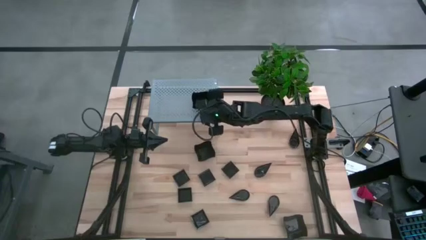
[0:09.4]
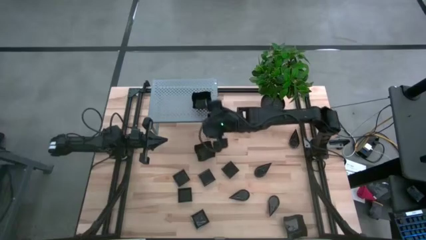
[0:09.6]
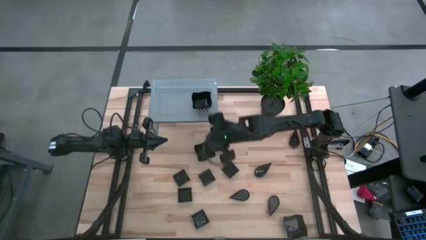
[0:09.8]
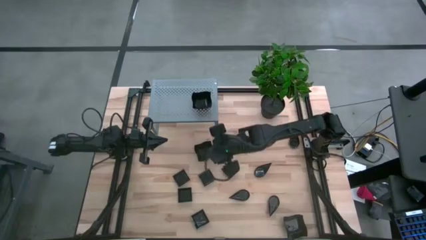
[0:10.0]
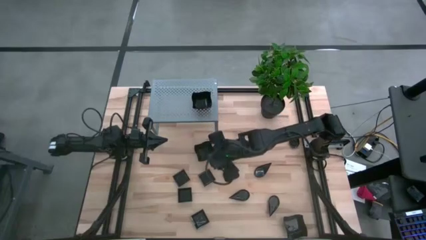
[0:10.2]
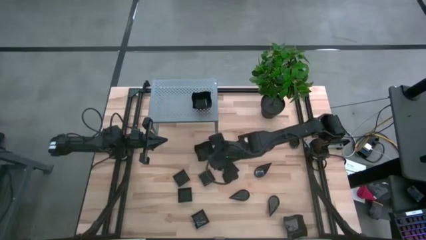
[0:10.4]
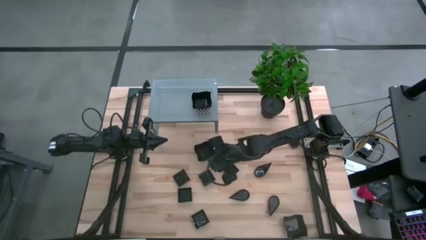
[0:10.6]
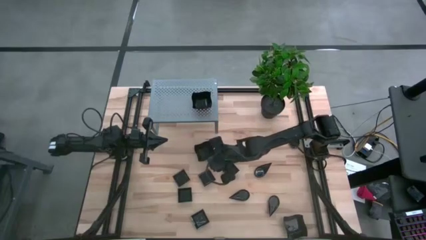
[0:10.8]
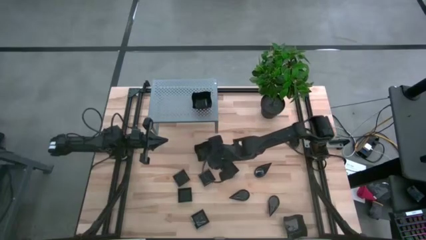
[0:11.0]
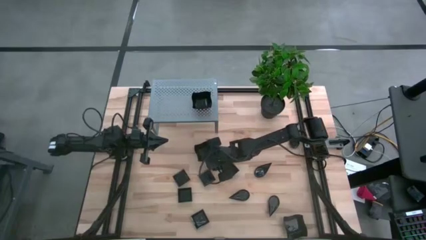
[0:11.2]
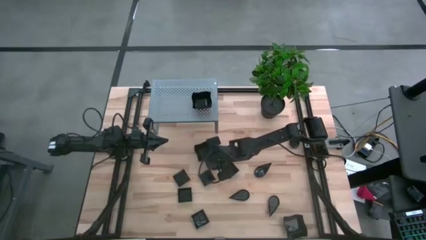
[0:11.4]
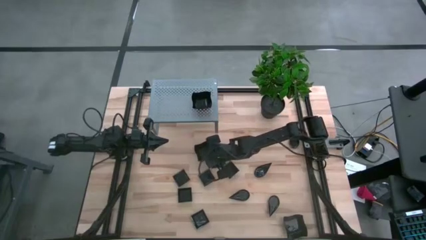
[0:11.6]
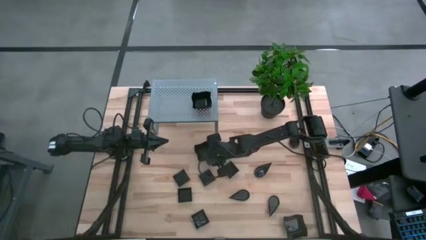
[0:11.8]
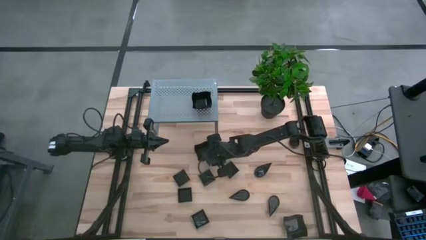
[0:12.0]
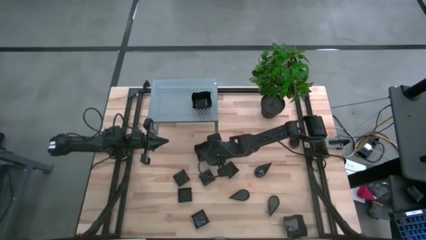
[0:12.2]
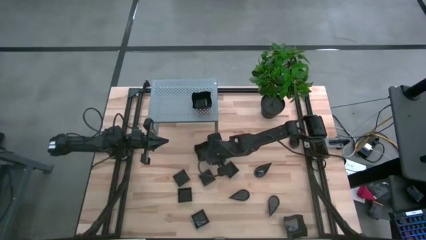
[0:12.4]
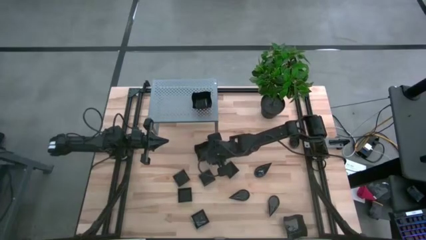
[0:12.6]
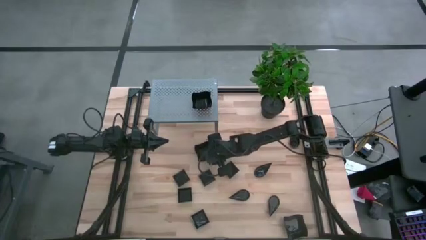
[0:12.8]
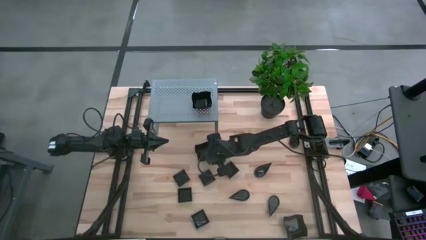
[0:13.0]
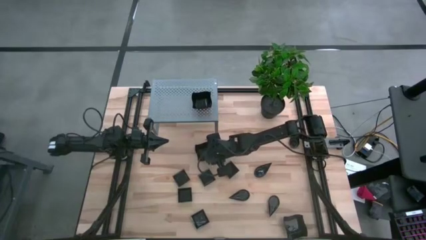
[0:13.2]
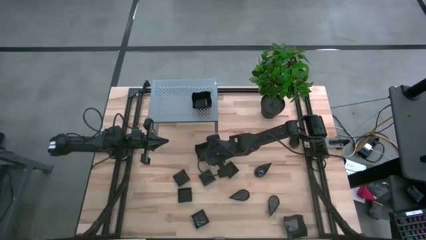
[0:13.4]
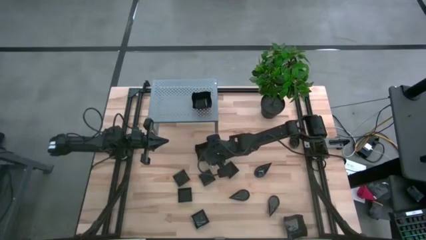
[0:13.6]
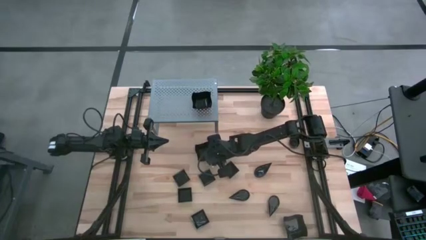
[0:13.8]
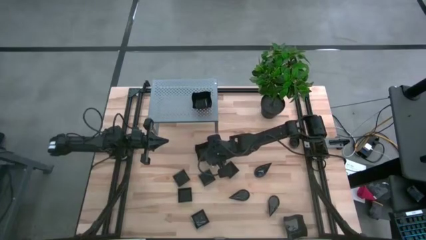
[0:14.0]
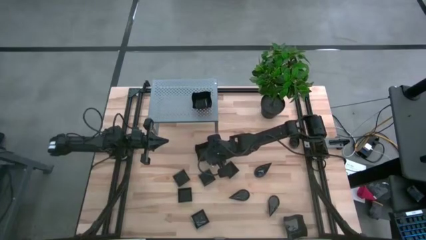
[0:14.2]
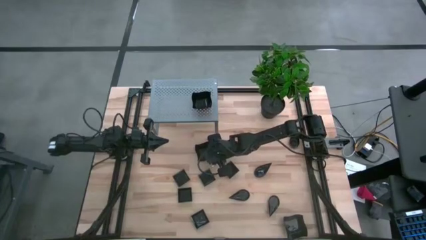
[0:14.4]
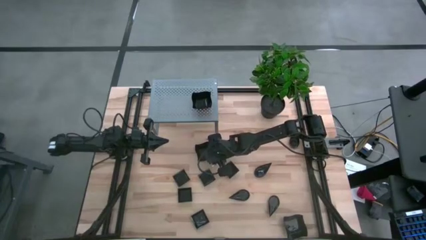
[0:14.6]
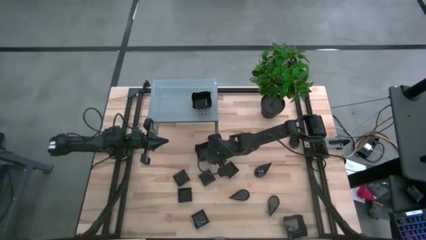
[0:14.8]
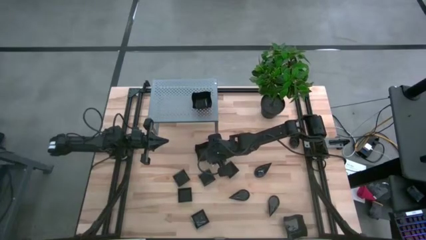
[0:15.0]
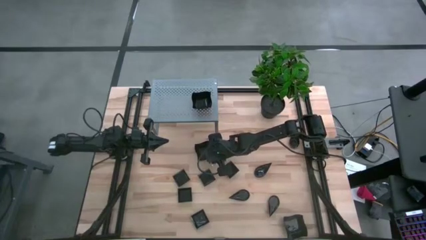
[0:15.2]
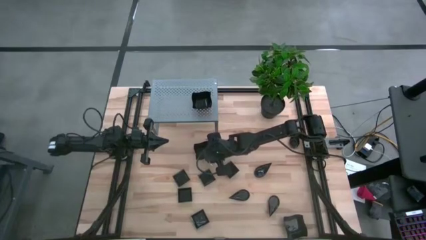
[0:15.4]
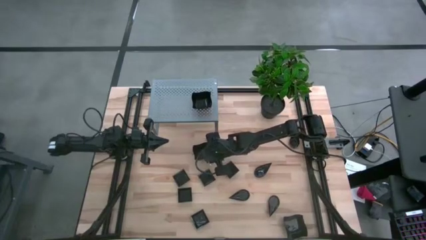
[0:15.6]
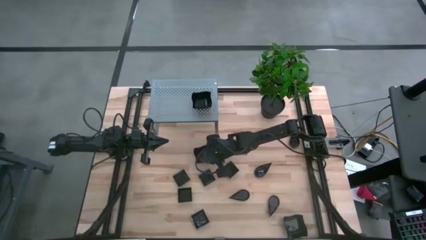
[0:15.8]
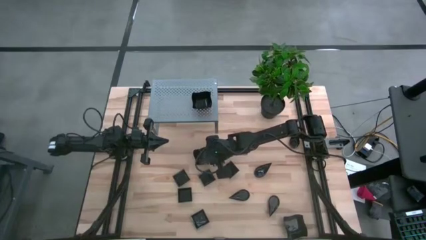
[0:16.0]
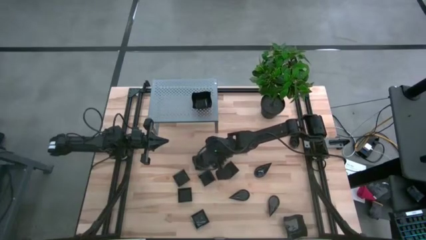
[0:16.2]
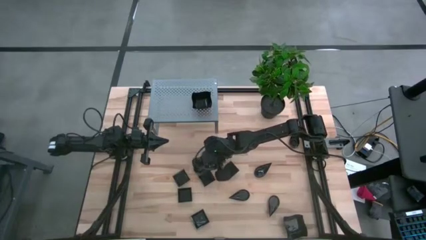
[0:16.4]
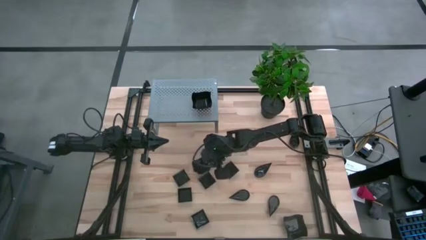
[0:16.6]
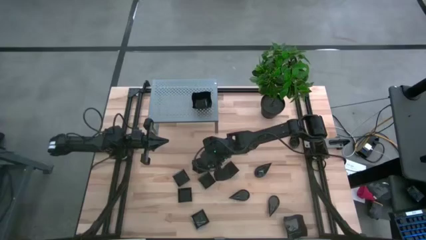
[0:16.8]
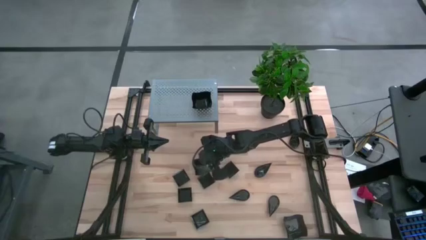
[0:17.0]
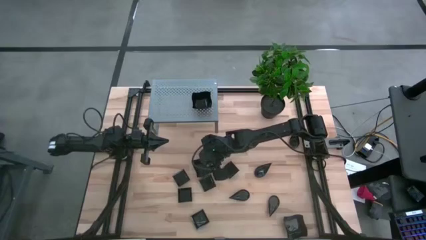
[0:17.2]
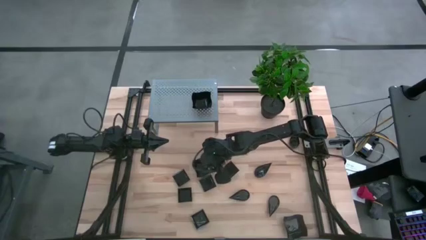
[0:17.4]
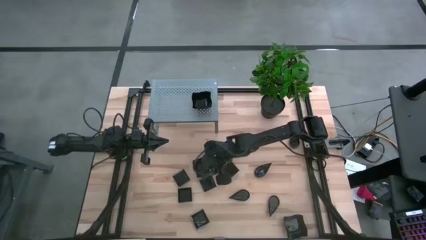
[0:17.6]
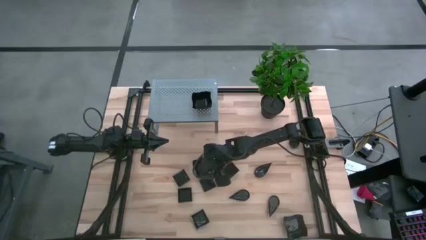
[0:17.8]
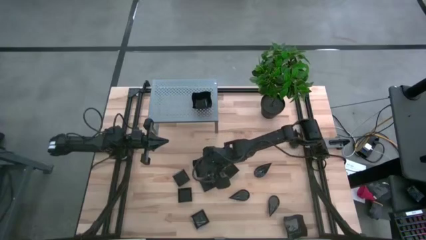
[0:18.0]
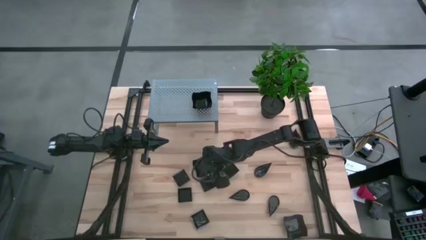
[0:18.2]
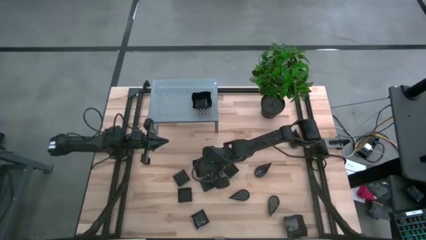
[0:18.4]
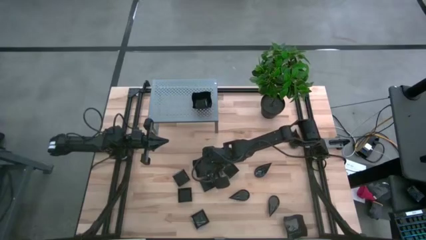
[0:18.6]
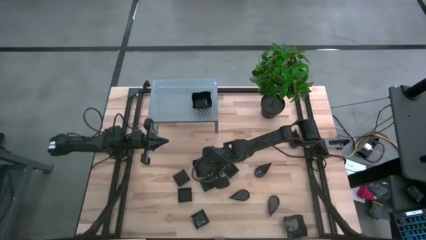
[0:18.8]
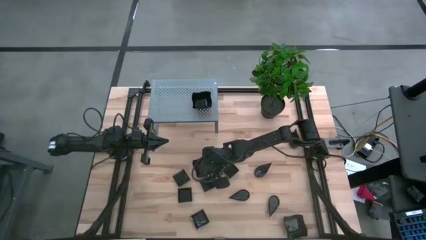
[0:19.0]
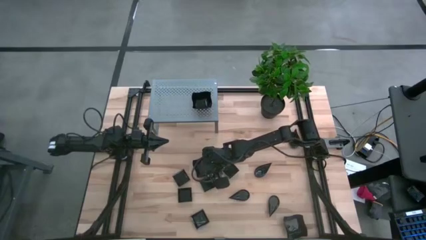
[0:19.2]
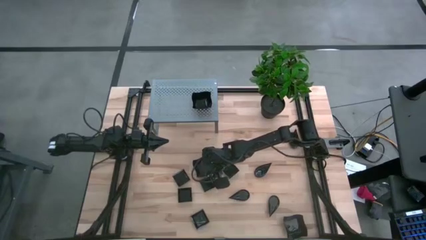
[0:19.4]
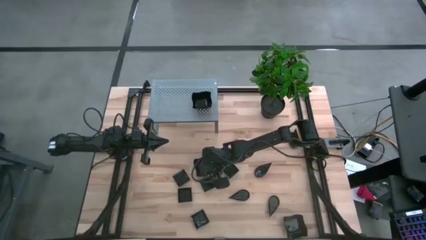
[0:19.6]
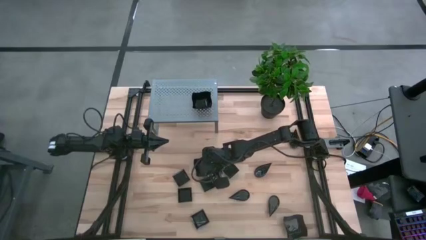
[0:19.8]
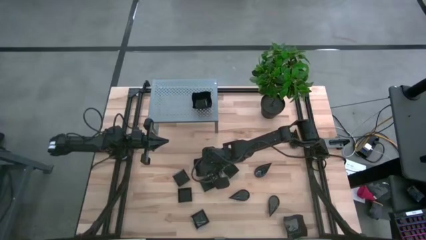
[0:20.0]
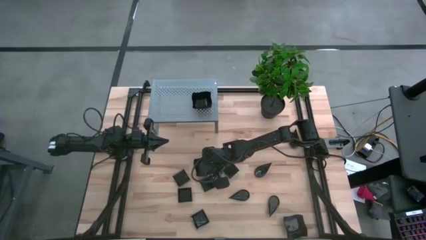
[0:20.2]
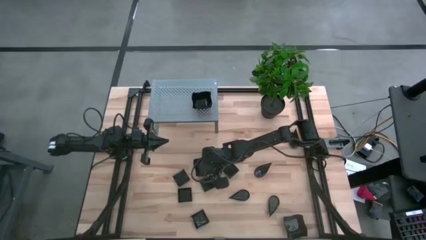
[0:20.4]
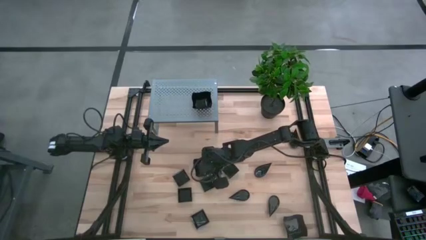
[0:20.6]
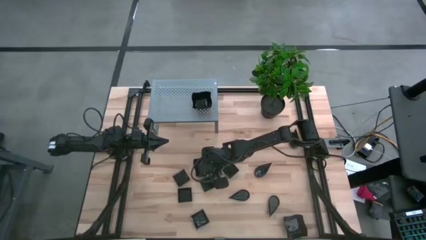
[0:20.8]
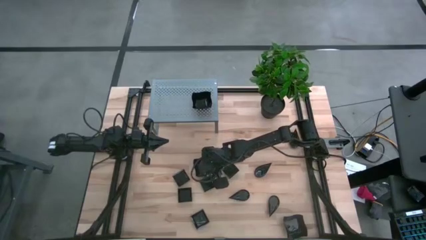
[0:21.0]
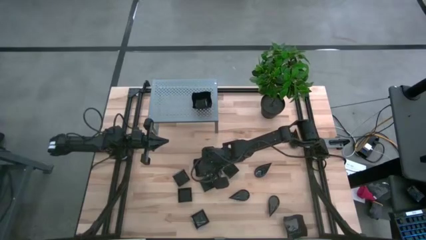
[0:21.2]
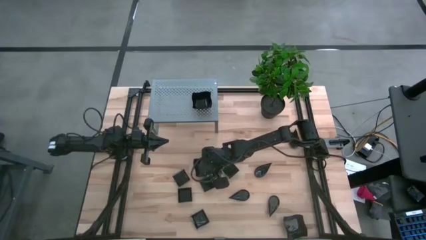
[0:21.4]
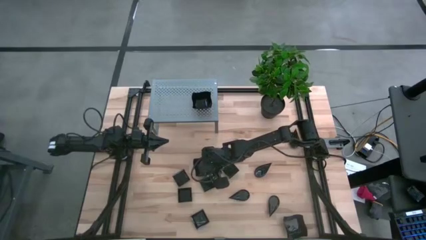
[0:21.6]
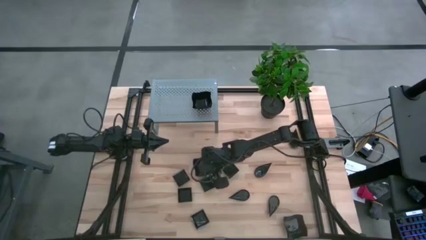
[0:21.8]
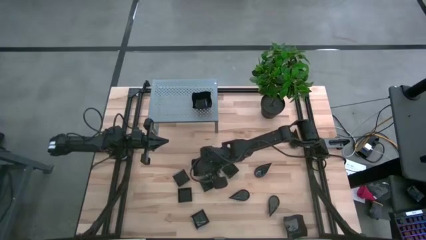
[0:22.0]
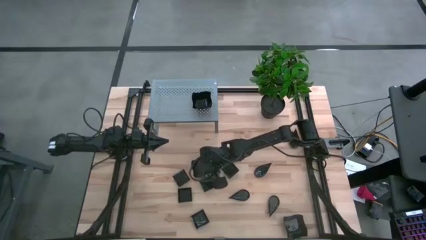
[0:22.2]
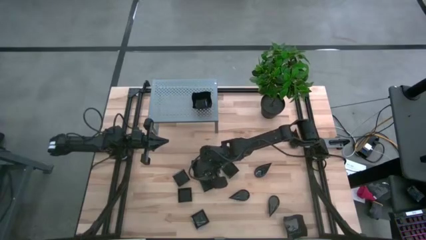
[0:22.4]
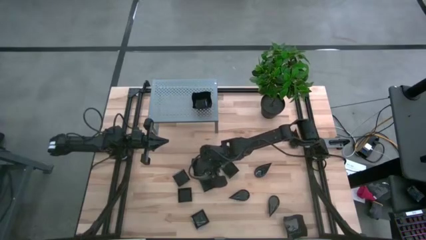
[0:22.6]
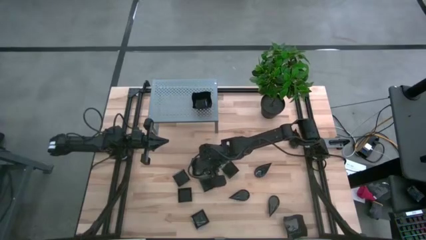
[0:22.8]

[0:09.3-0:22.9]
Task: Pick & Place Mini shaped plates
Stack the distorted square plate on top of the distorted square plate on the shelf
